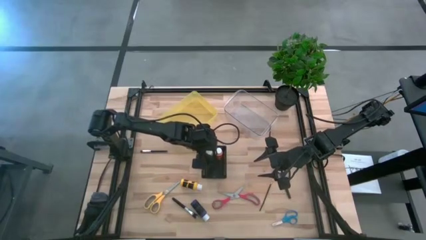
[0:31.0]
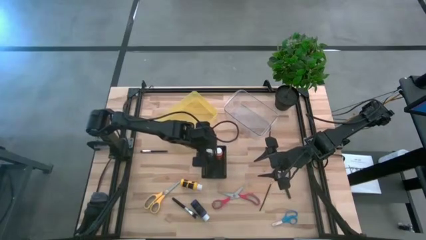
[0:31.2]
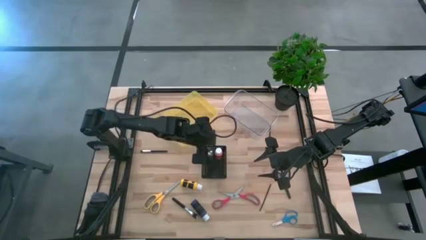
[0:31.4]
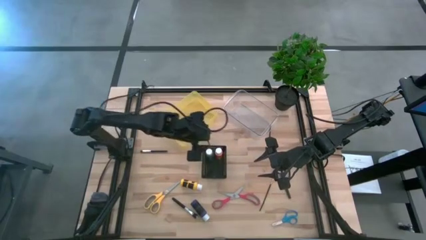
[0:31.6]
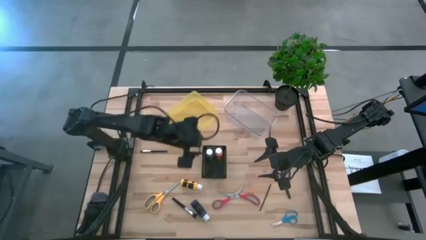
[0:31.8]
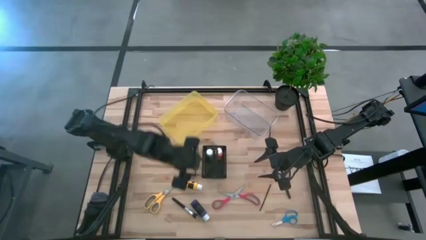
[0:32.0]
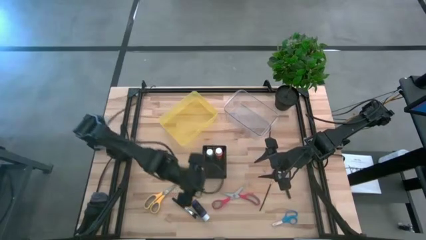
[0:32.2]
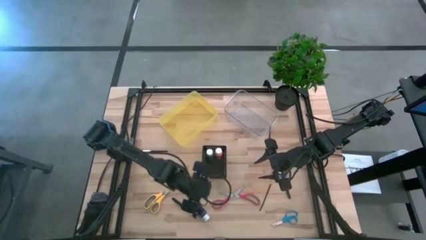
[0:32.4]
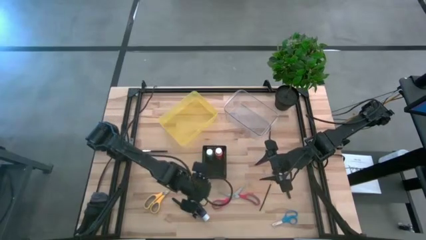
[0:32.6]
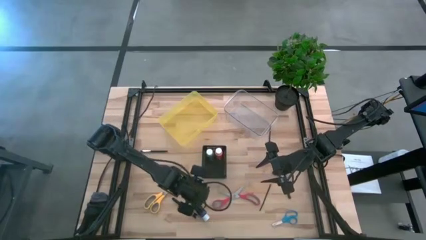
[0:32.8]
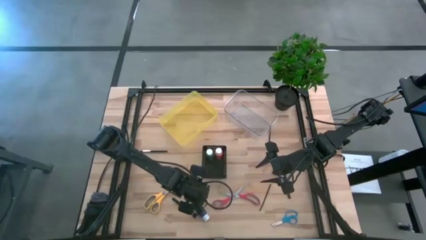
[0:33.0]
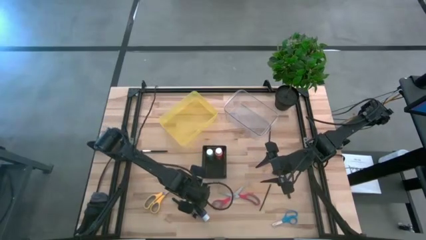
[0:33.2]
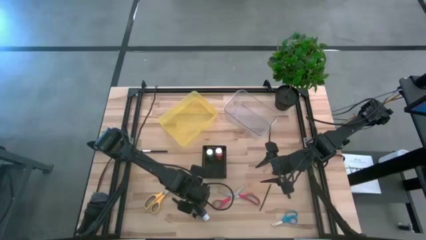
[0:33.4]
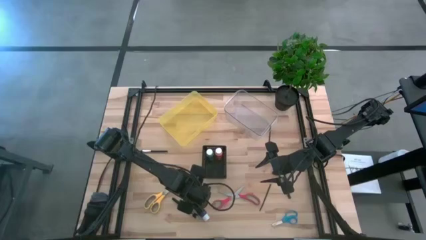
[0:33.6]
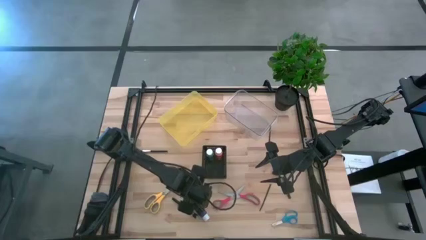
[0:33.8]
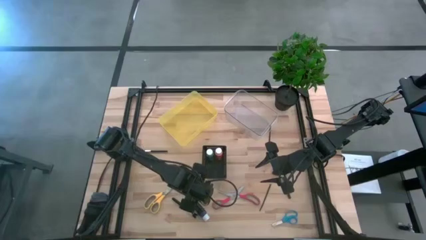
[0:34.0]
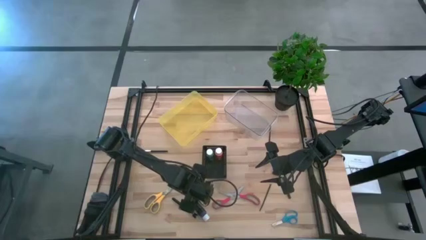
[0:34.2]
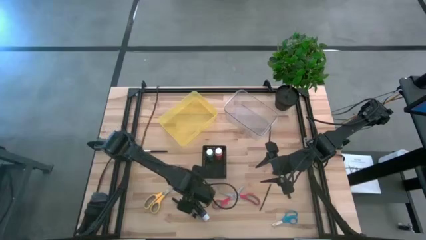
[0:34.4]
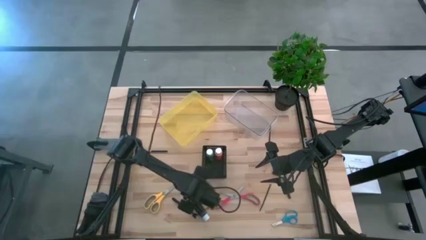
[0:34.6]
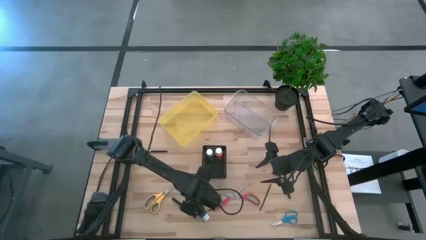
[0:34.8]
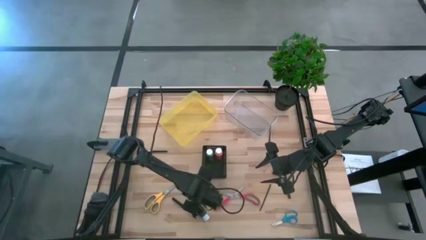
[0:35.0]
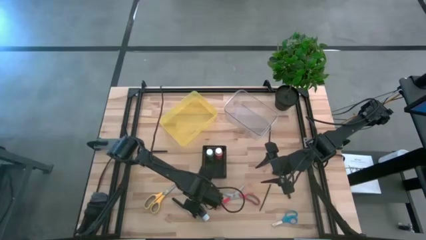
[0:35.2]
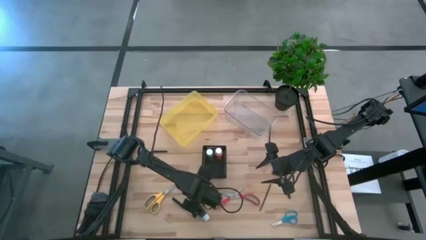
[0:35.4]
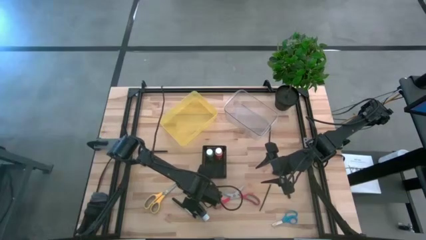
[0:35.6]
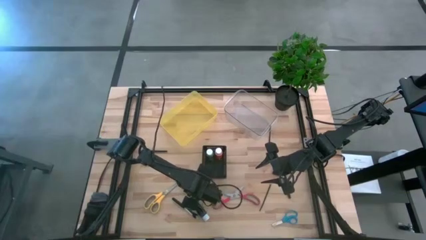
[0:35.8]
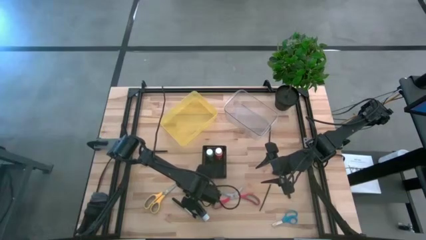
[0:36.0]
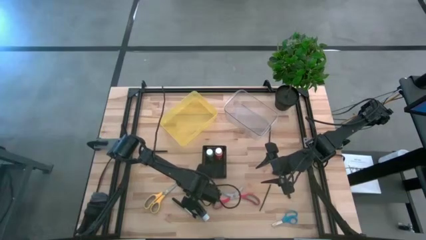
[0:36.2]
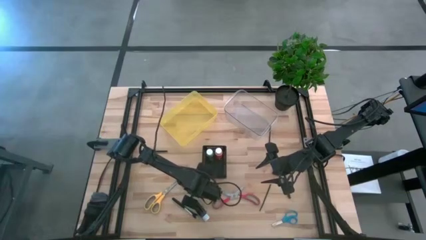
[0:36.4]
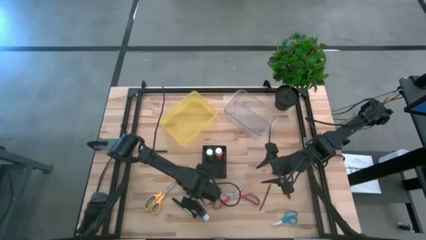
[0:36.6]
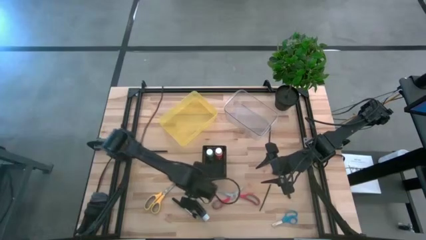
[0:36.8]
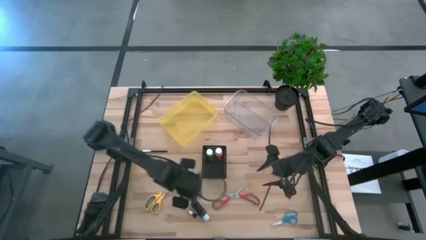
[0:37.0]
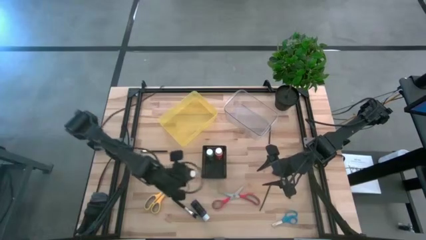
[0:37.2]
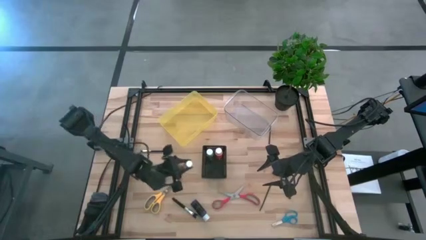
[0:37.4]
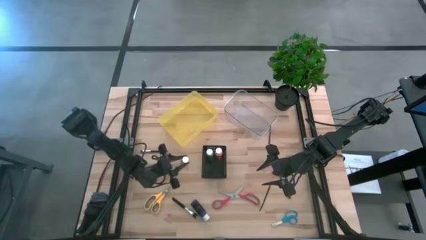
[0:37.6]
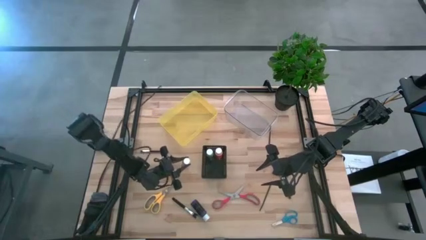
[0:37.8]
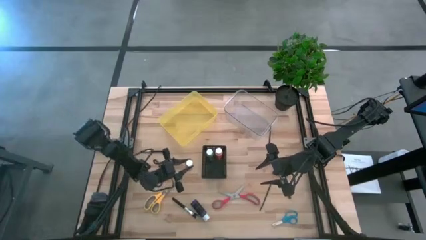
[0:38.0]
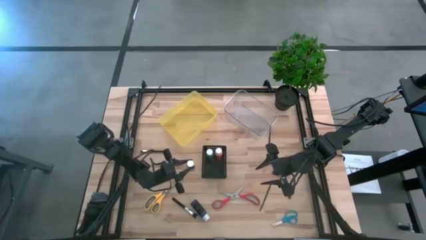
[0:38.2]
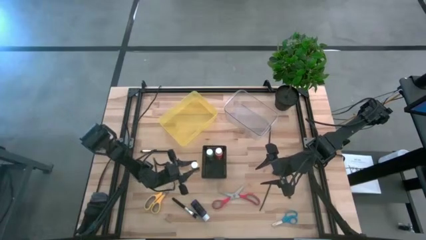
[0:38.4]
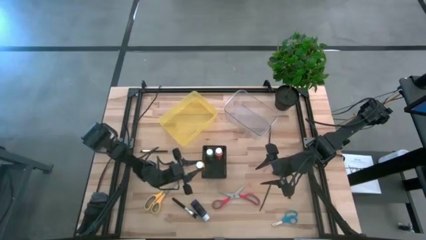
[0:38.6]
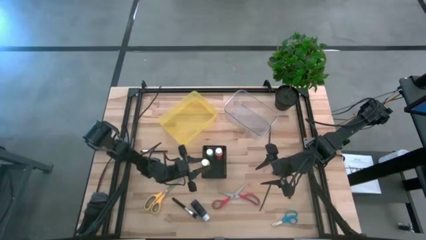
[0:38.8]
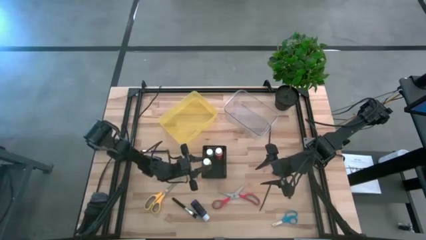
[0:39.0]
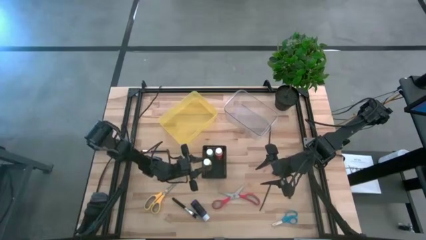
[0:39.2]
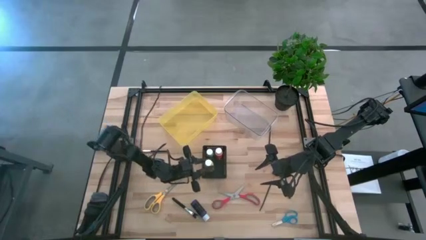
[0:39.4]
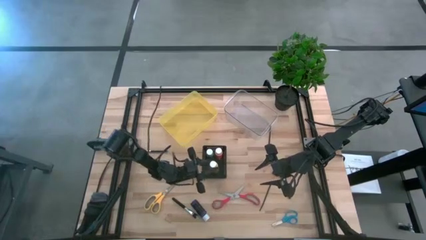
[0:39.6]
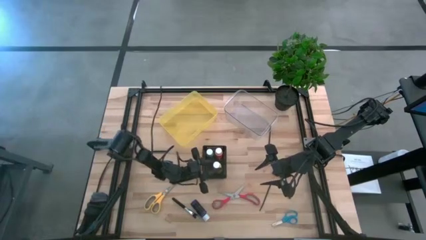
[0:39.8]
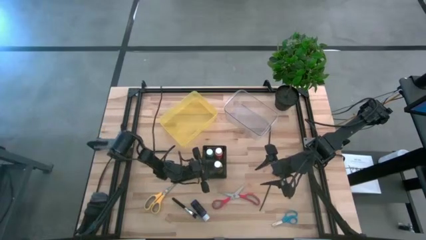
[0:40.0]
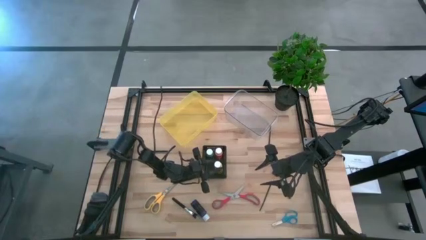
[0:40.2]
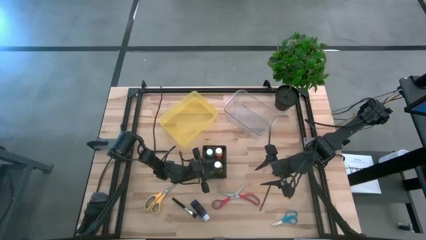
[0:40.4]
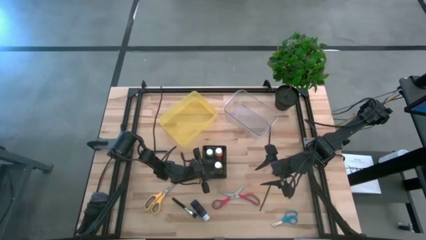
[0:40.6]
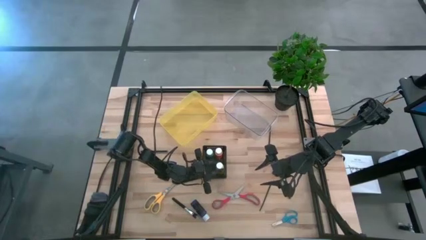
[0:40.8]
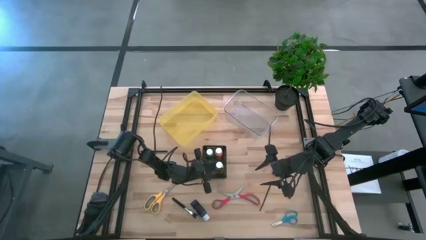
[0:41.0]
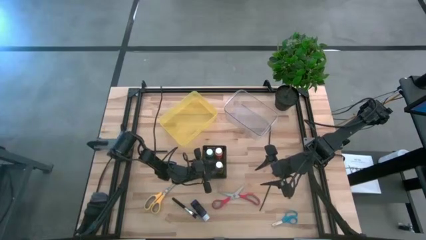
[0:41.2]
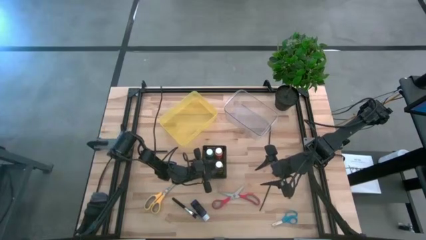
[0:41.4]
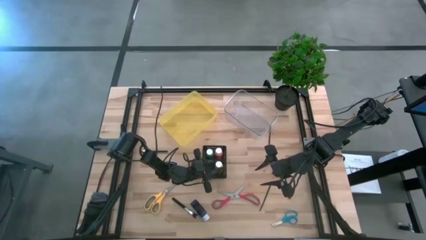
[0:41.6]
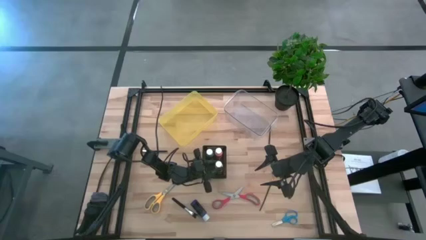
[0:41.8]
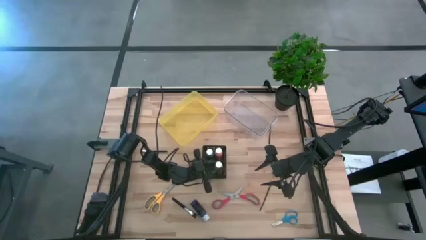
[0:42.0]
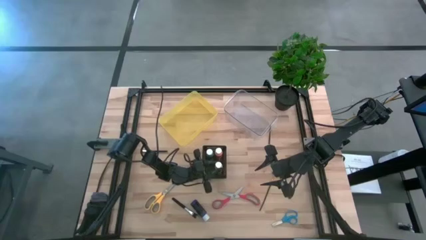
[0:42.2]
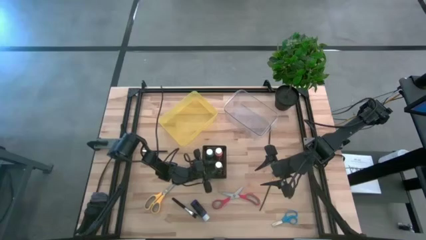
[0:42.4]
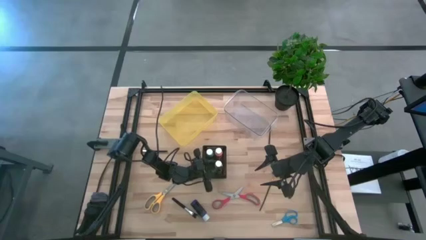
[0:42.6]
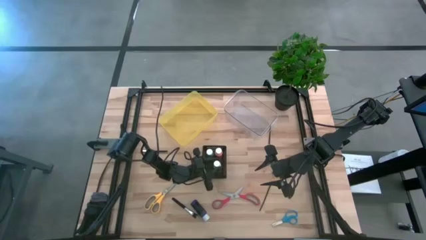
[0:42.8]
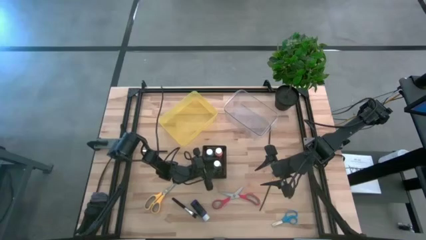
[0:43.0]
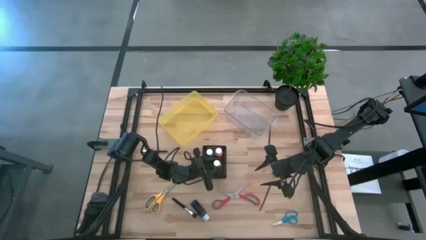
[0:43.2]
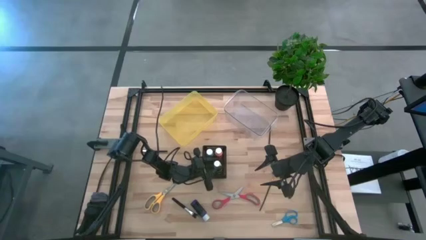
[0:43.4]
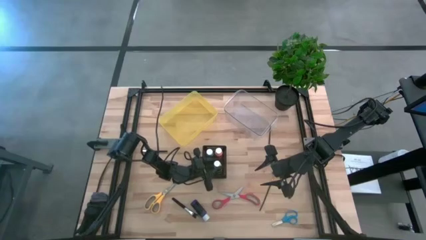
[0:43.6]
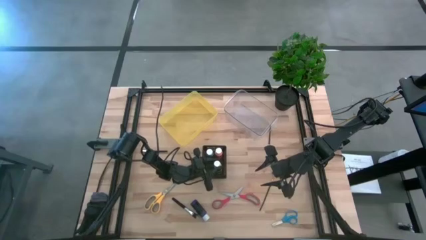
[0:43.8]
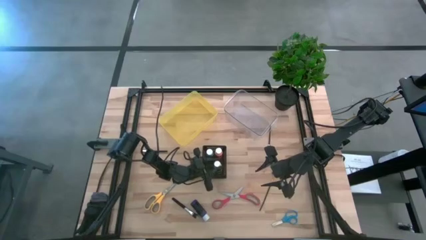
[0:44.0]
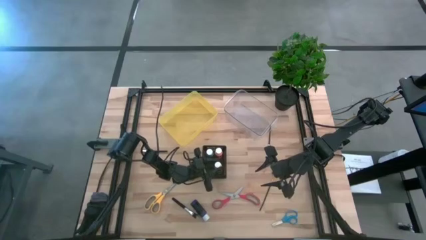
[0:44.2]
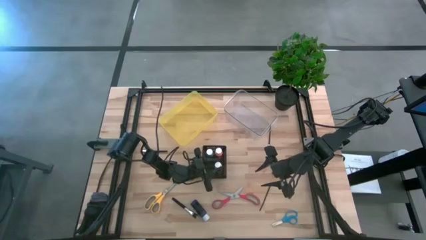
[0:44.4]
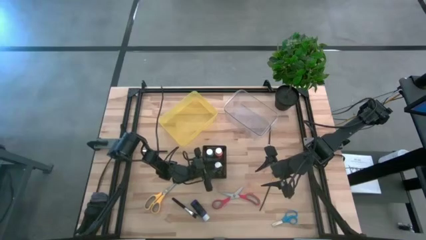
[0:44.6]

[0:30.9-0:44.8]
Task: Pick & Place Paint Supplies
Put the yellow paint bottle into the black bin
